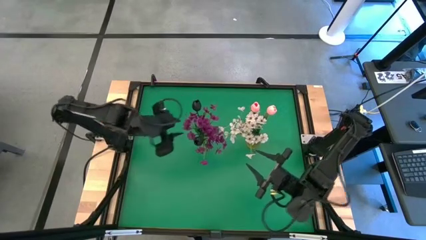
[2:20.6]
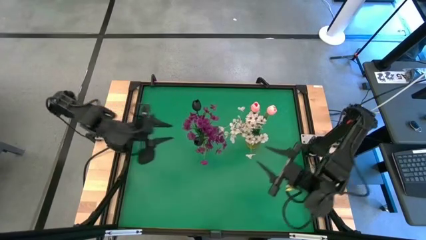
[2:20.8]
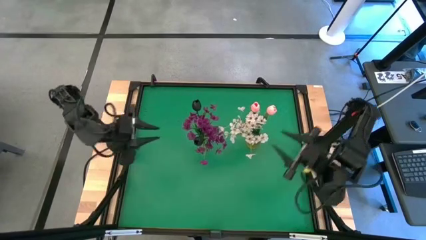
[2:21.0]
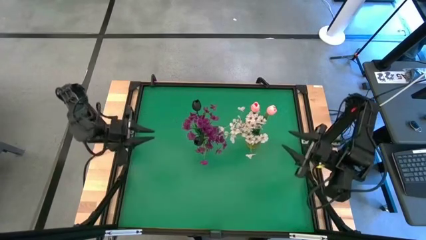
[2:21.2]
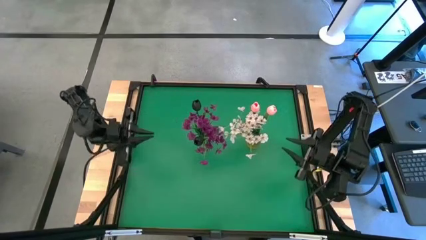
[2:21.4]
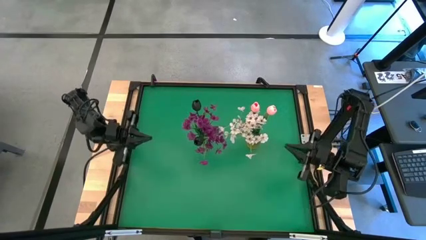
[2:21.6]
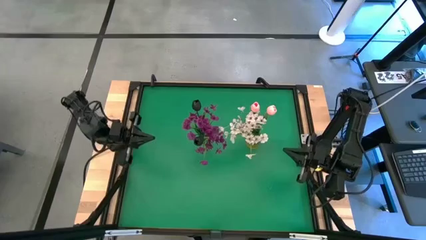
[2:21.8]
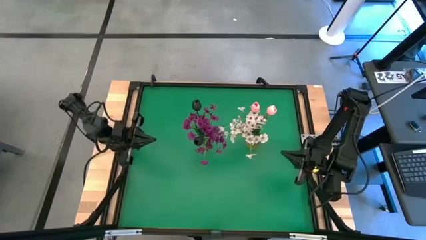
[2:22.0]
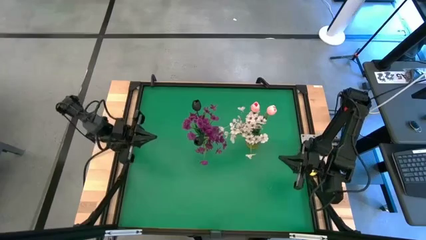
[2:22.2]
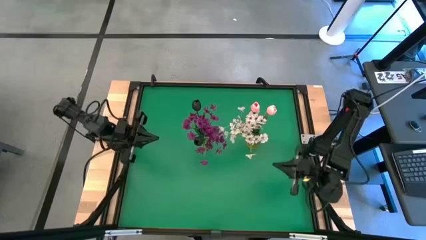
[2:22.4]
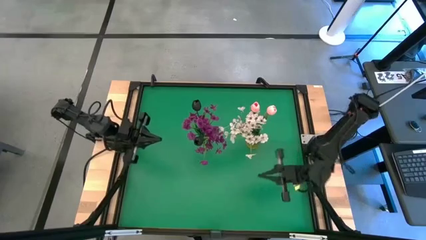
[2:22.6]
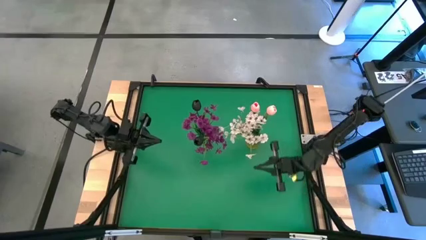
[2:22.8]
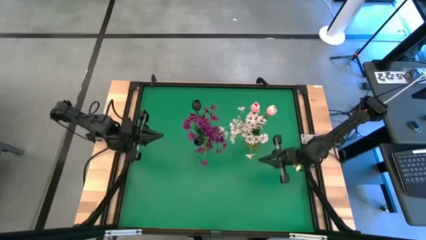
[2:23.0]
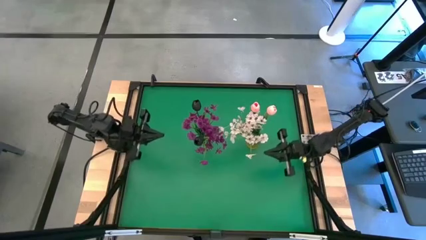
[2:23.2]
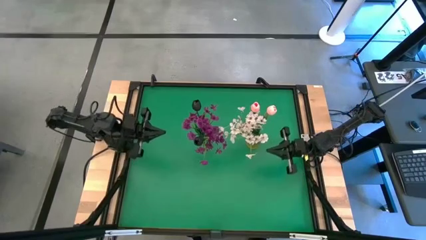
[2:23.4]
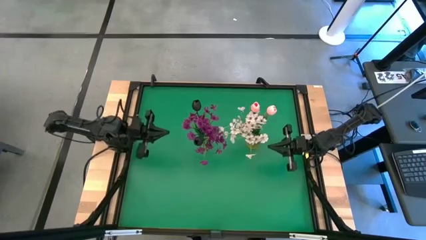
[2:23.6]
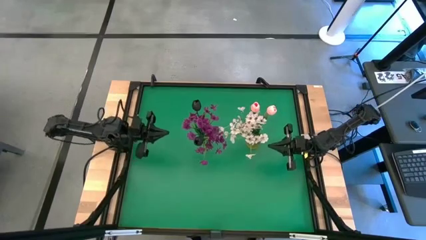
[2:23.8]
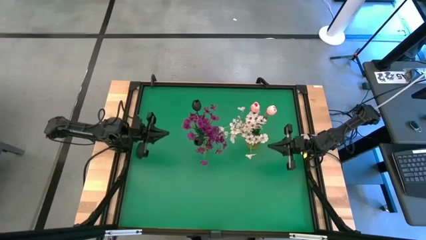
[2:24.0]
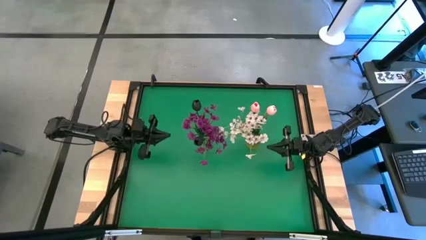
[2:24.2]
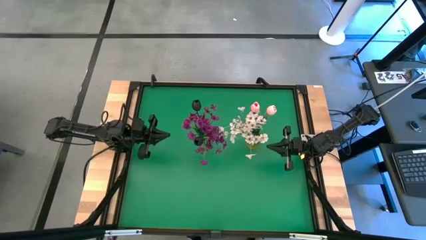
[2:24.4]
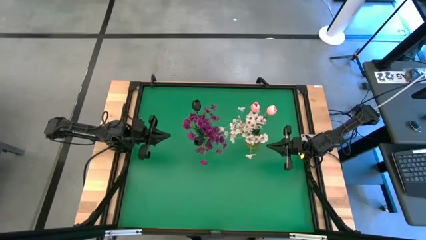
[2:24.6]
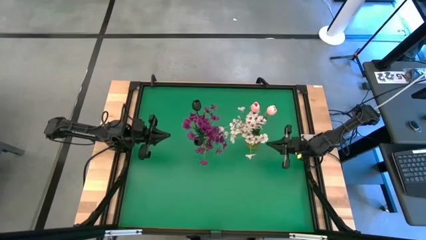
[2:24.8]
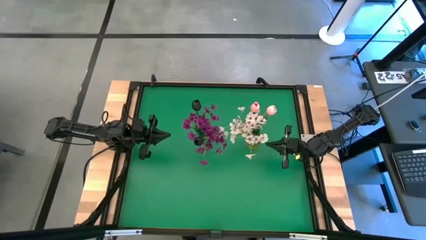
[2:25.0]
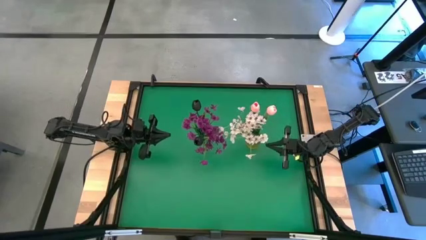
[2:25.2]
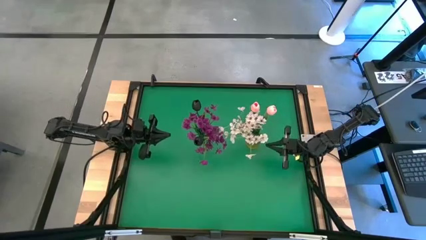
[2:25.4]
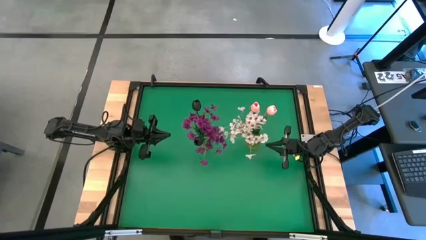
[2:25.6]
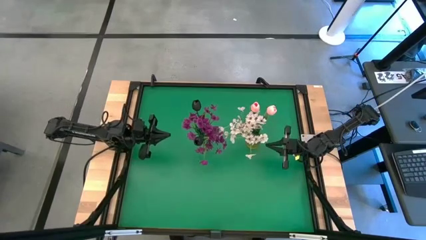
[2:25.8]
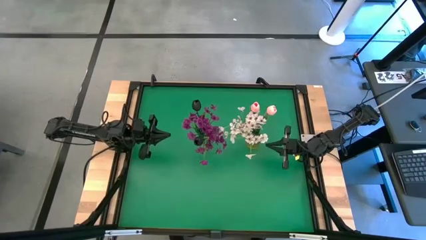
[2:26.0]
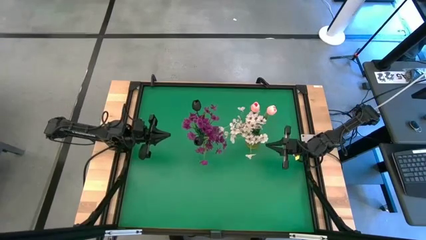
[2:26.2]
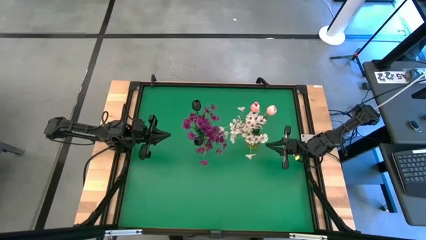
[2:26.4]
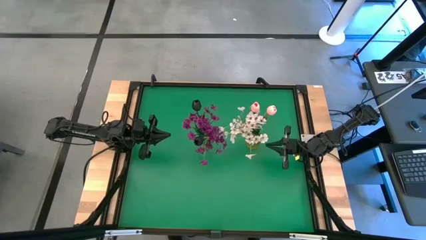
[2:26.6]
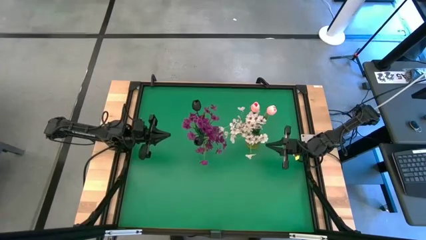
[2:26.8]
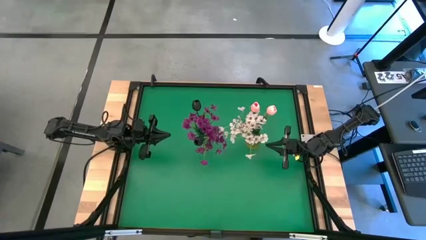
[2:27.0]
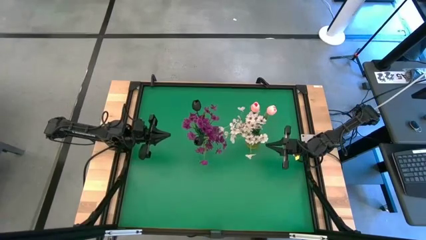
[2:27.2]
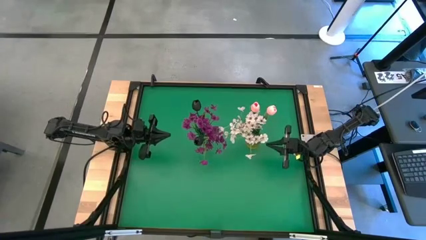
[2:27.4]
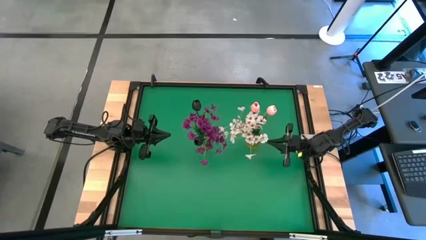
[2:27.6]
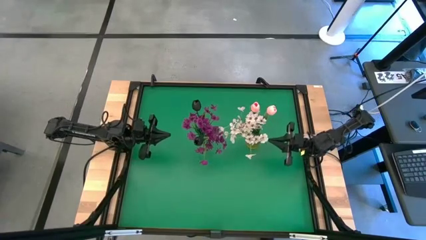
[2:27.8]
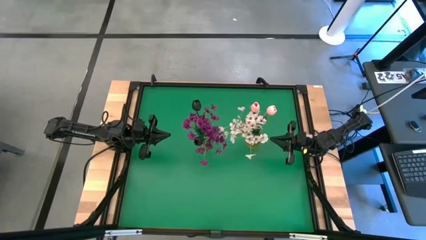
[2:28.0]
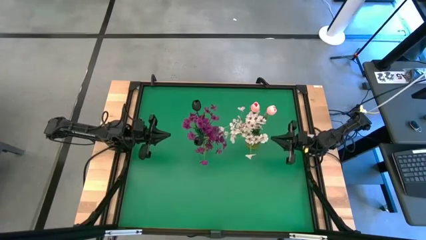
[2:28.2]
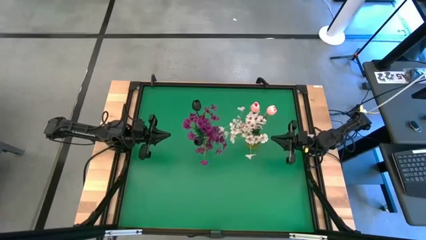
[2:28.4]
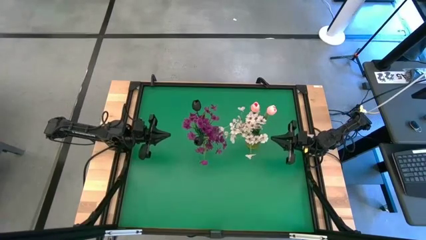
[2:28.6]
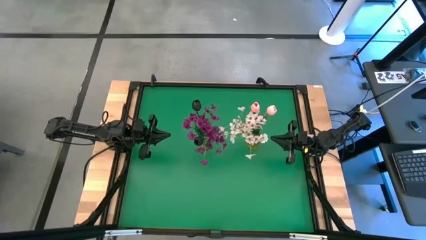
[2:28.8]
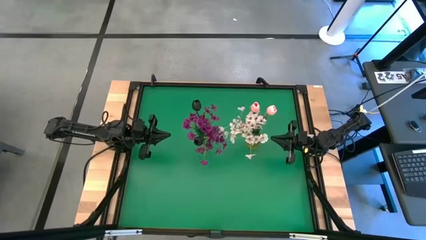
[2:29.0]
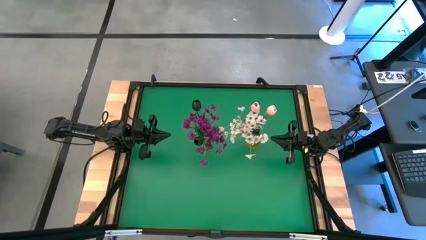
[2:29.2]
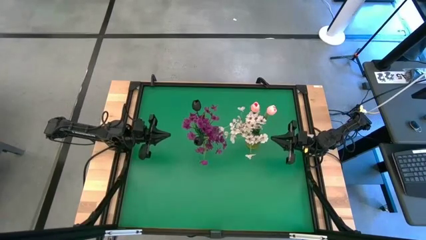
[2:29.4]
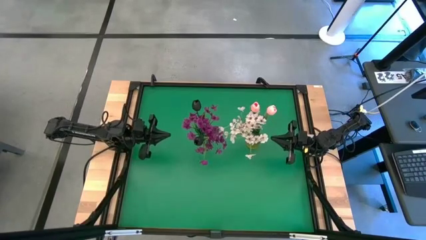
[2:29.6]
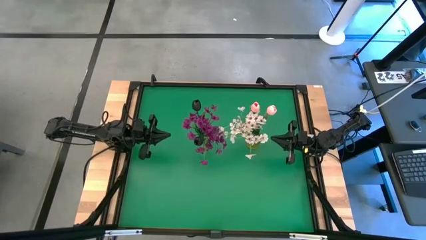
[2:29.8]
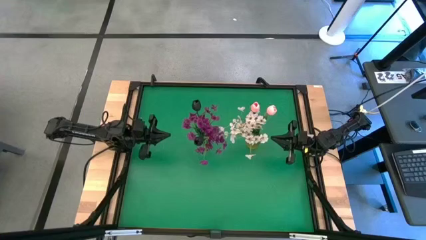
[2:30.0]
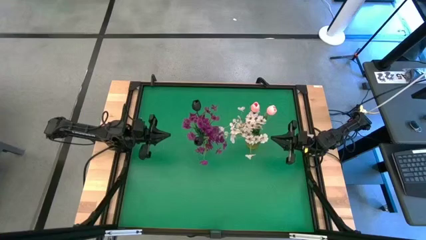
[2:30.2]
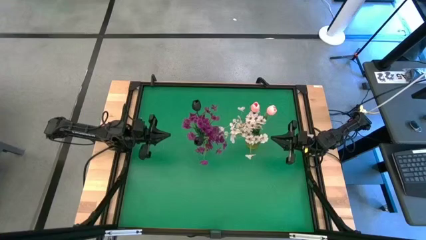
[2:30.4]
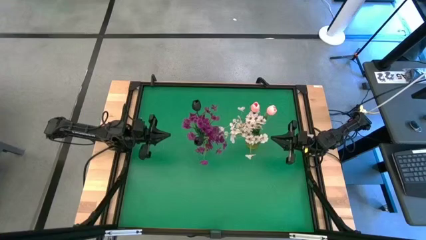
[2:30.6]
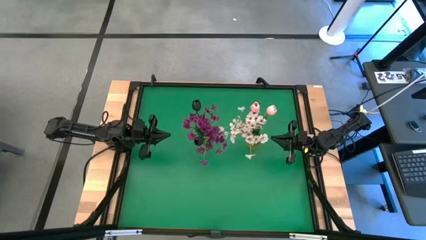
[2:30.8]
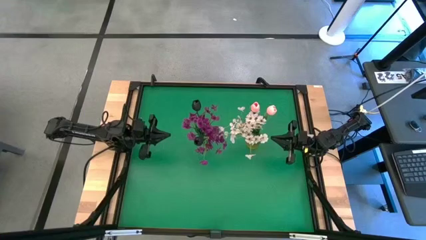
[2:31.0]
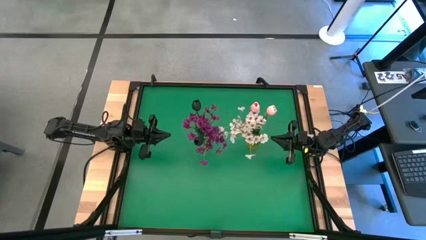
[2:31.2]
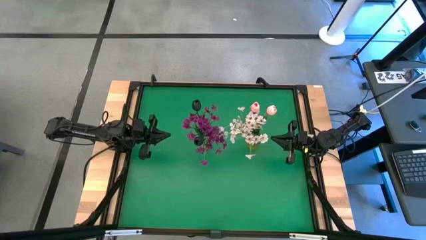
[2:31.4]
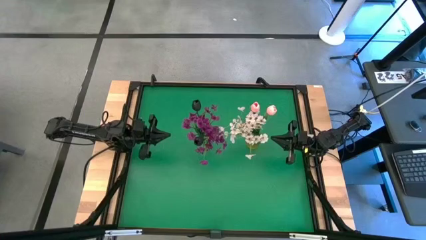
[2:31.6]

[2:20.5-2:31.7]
Task: Sort flowers into vase by color
Return to Home Position

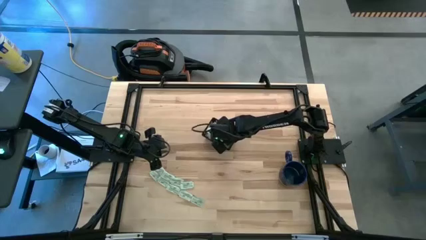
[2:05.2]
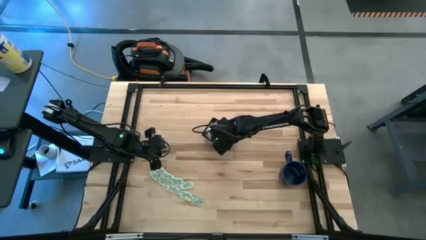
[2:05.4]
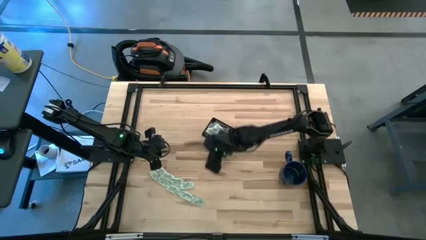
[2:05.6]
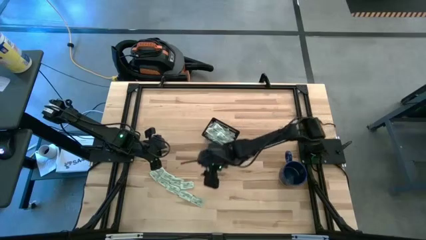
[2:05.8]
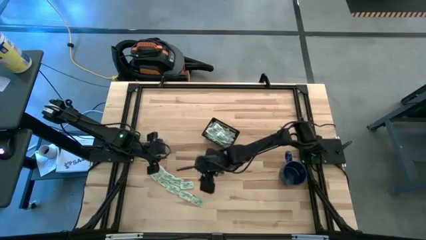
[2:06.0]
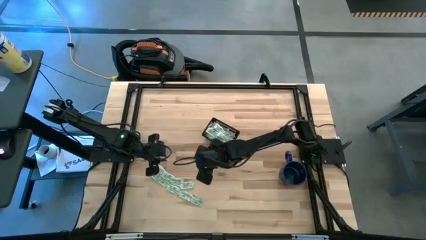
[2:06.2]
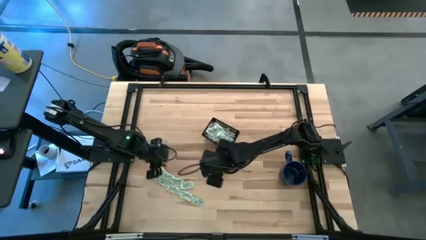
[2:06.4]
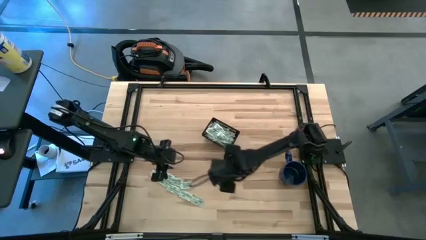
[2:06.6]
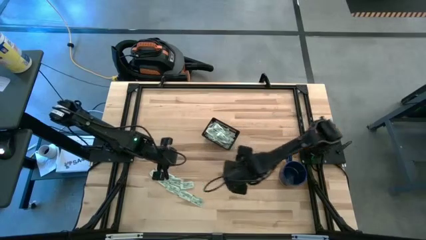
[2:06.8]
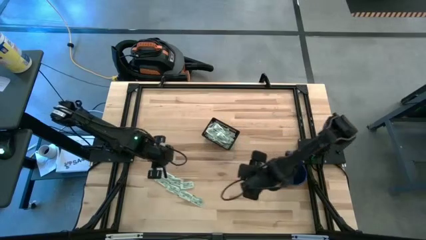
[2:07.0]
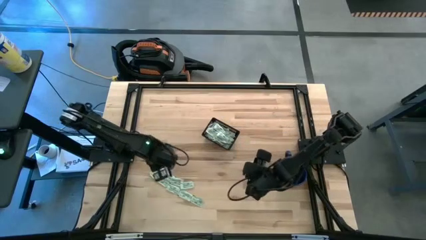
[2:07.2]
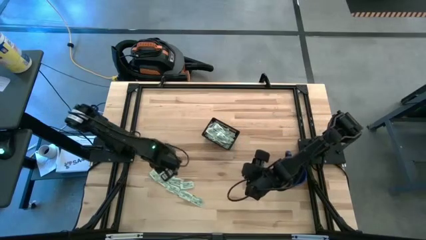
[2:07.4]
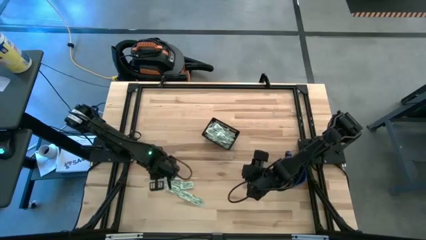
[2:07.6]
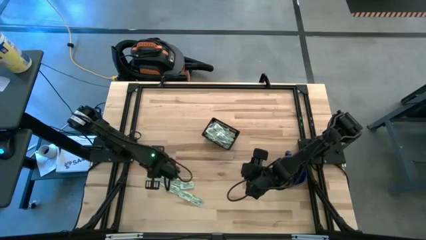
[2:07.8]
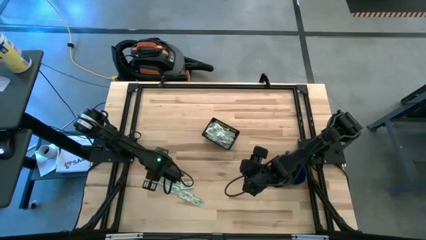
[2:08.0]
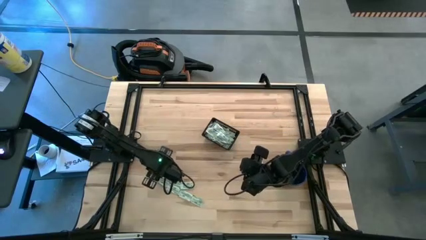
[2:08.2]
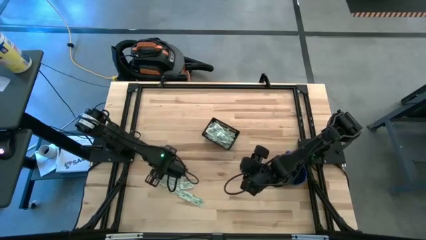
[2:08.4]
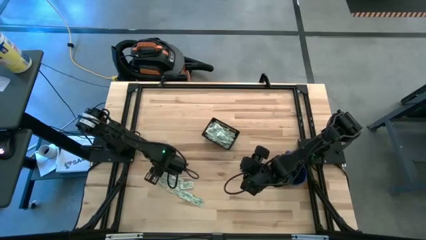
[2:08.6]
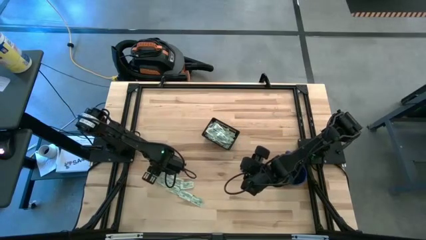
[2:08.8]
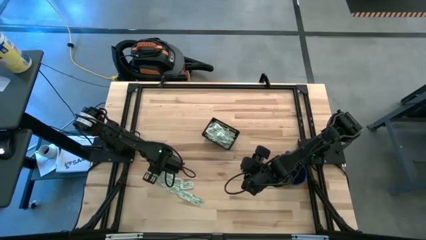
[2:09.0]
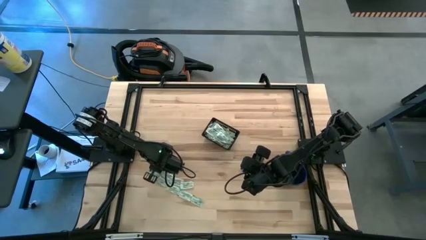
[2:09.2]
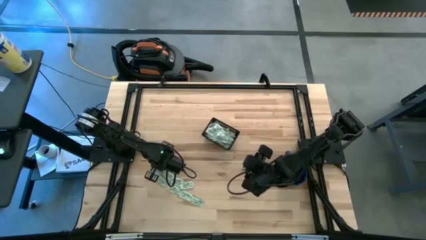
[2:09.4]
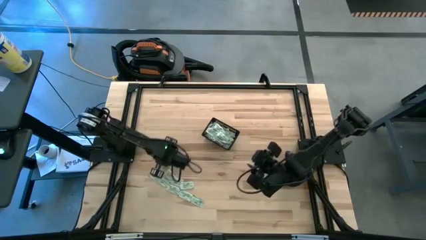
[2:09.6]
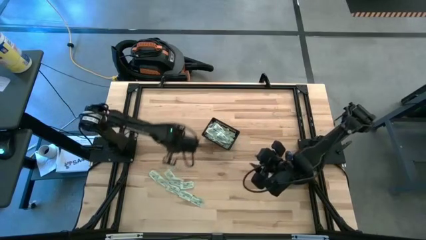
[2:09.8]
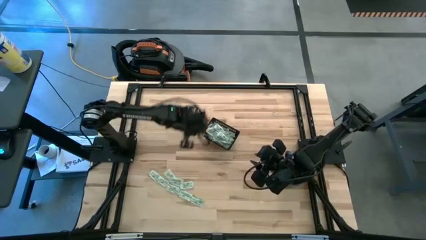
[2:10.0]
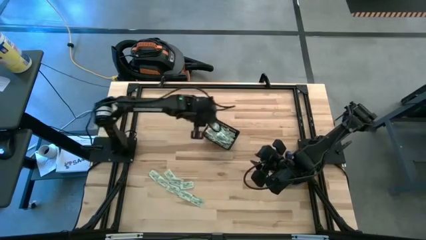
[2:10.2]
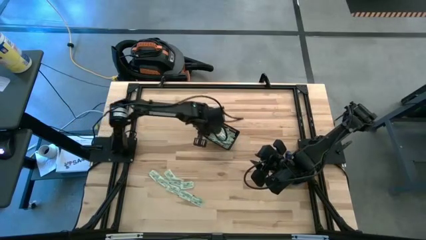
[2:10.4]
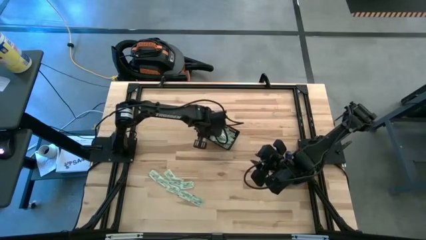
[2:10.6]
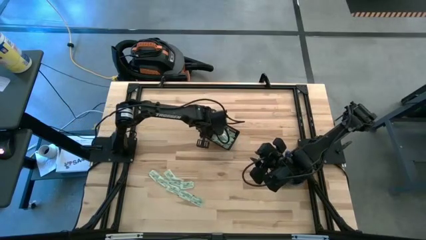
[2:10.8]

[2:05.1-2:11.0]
Task: Pick and place Stevia / Truvia into bins
Put the stevia packet into the black bin
